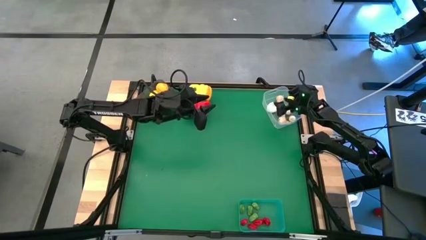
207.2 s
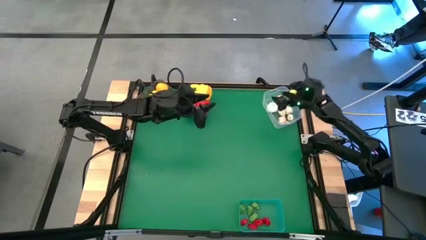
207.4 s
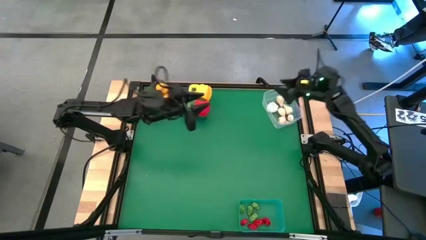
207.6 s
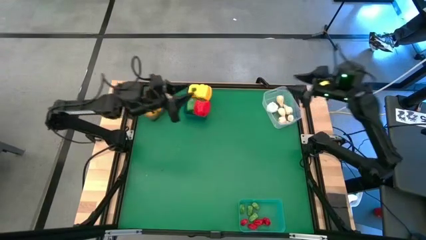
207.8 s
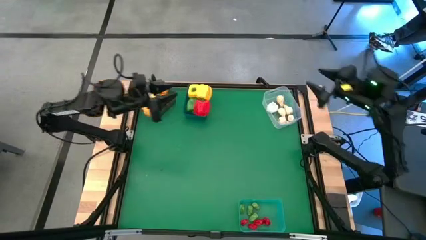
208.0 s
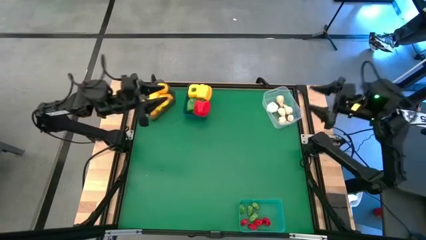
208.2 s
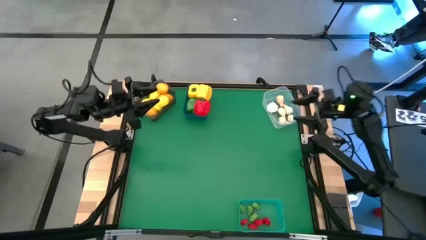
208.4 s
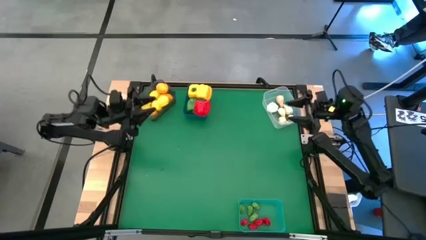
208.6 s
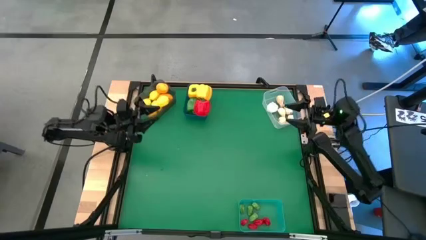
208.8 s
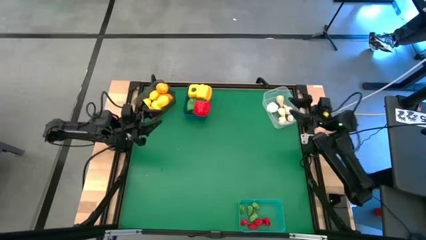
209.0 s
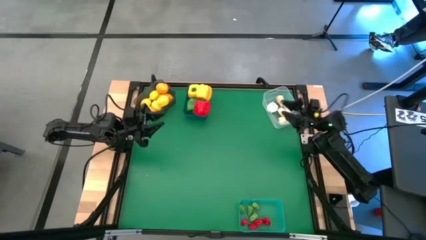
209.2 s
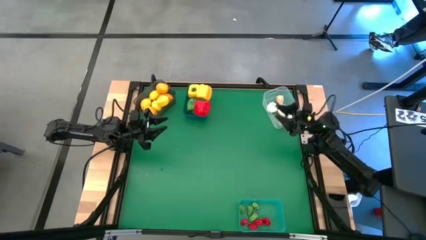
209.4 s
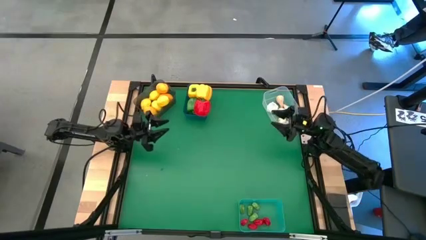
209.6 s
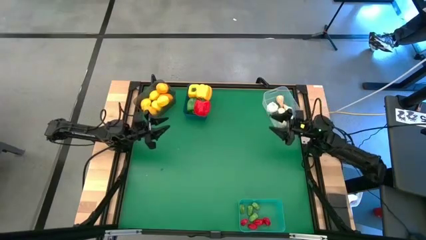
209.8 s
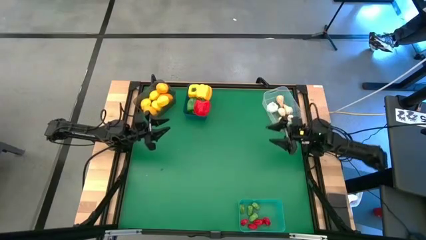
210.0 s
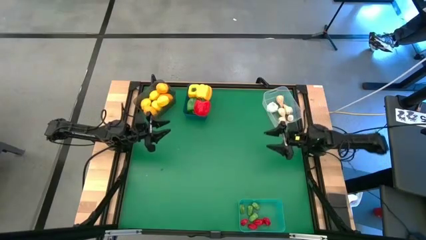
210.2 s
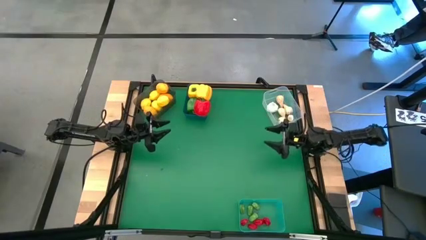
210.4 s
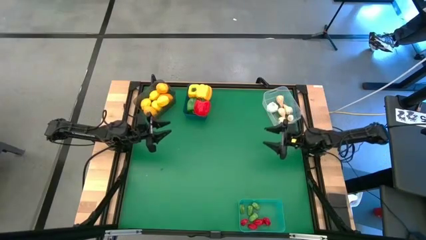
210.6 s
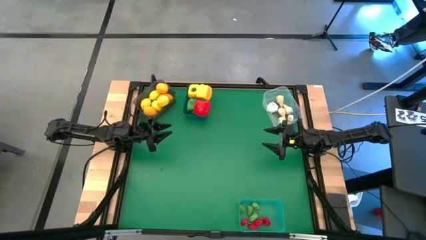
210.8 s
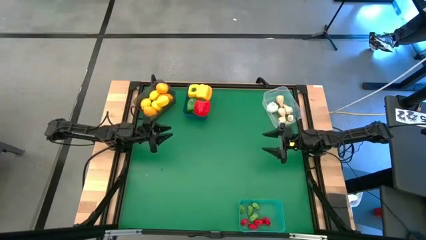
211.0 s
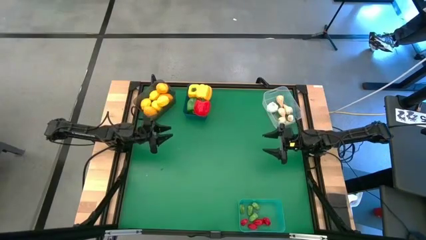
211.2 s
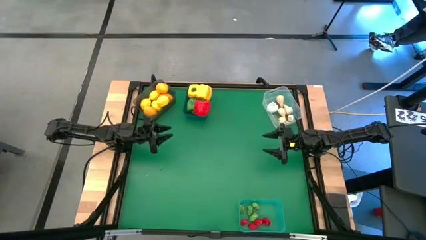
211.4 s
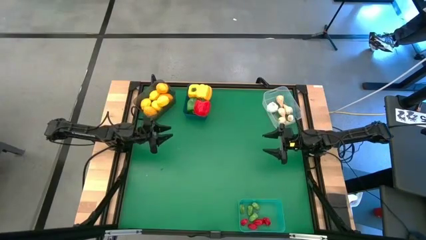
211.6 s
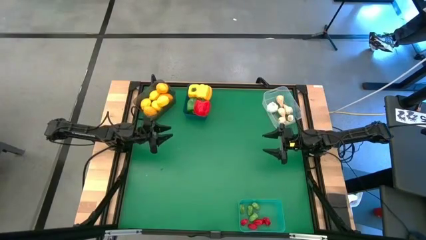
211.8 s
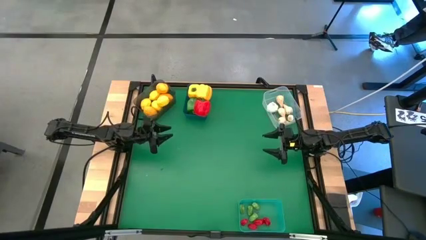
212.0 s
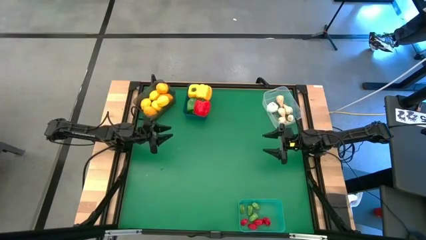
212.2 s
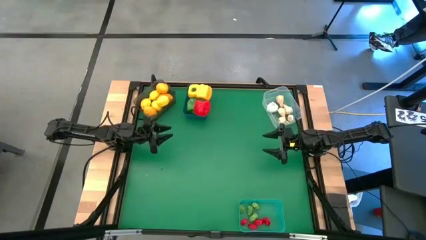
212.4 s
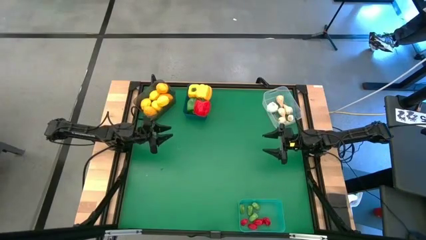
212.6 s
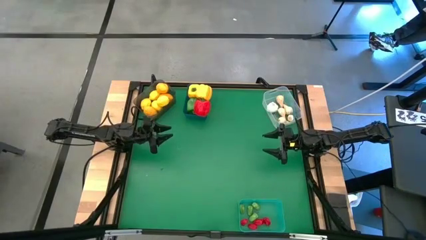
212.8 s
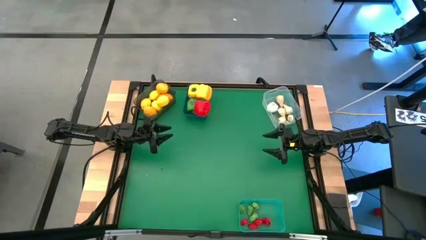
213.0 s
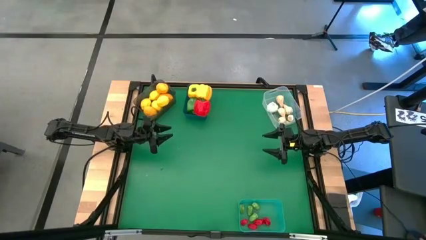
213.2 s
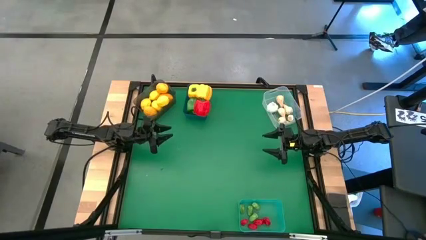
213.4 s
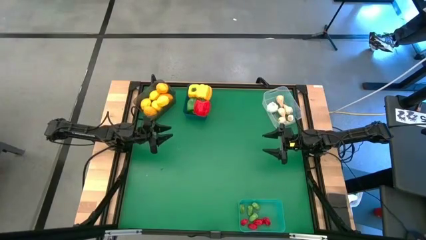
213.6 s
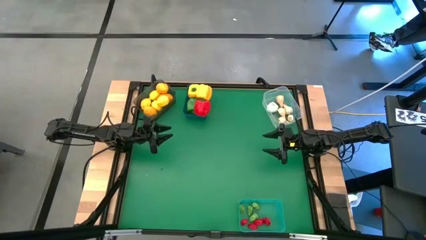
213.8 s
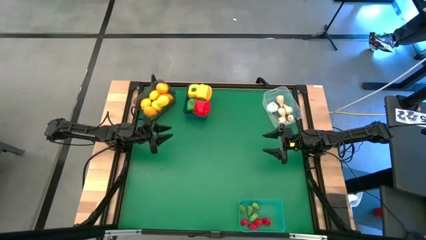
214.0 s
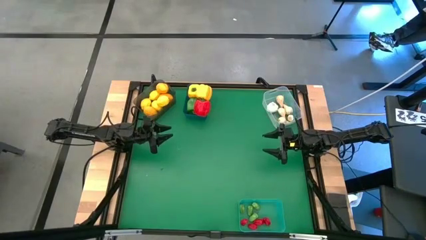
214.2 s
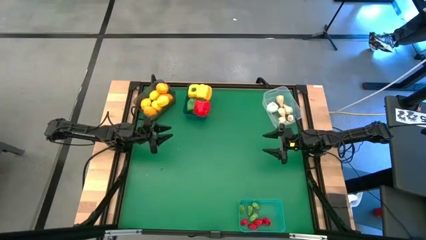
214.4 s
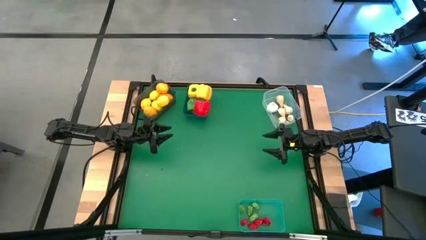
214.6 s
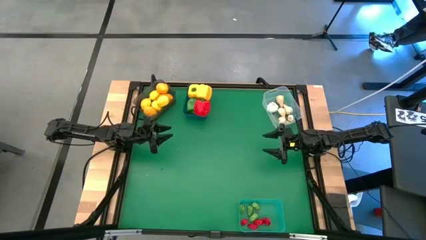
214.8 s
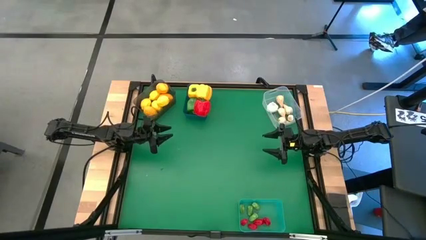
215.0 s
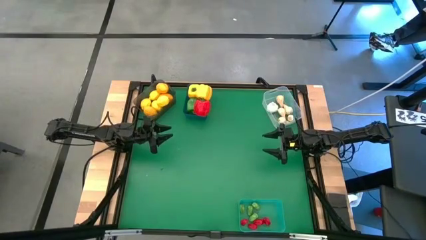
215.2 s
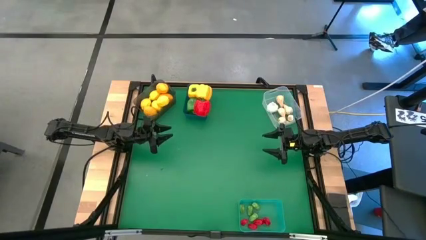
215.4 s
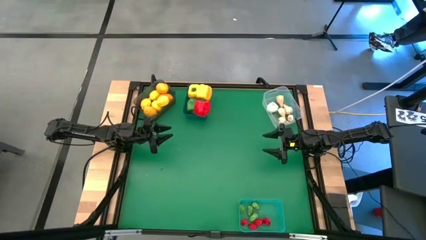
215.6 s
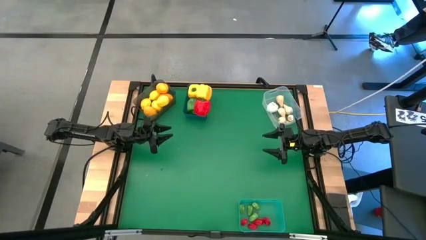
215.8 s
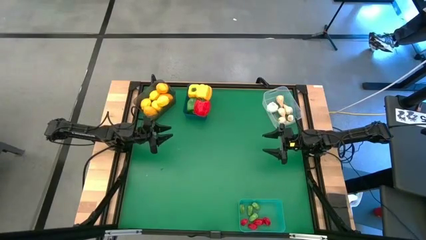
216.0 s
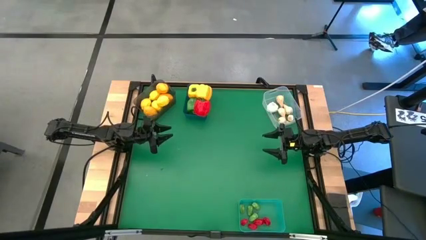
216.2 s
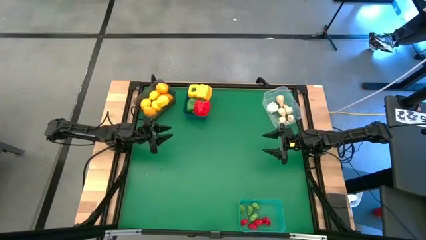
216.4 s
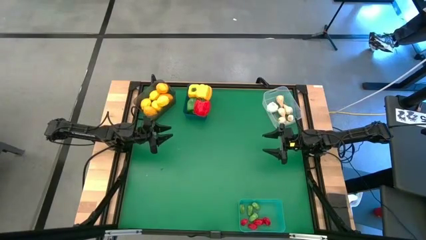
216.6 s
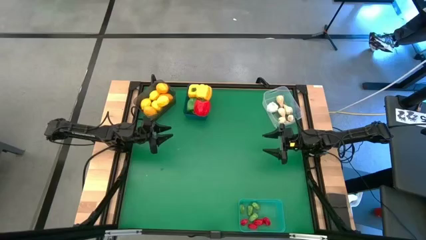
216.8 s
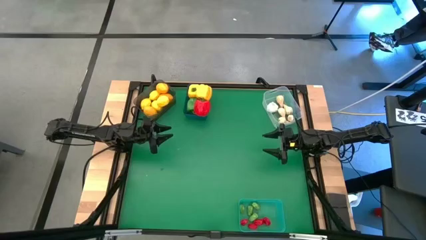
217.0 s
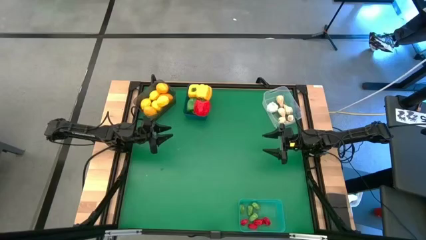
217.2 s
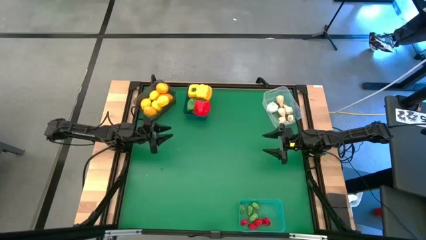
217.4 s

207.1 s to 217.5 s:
Task: Sort produce into baskets
Return to Home Position

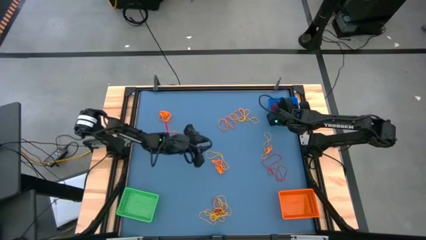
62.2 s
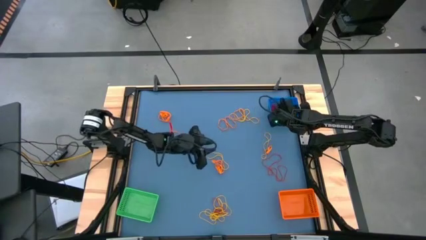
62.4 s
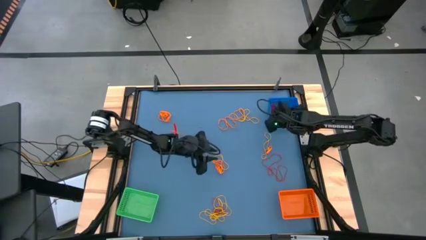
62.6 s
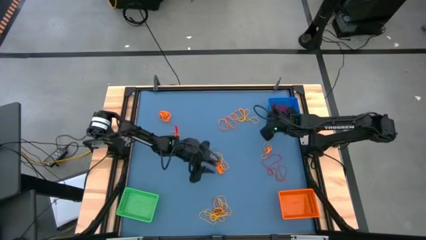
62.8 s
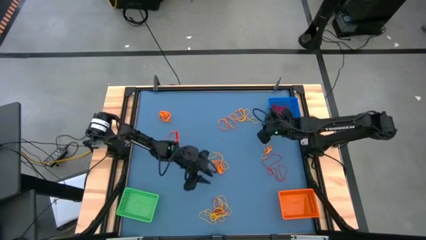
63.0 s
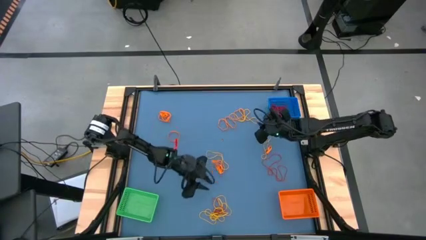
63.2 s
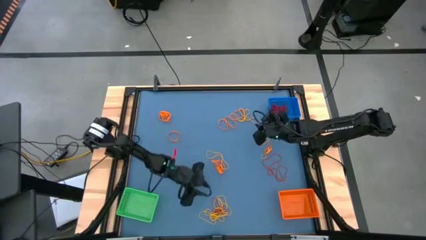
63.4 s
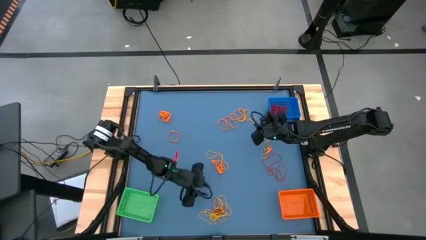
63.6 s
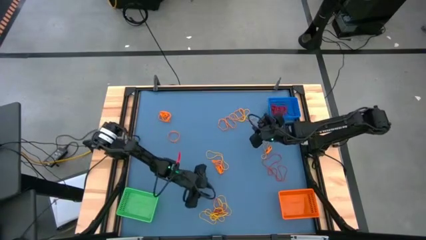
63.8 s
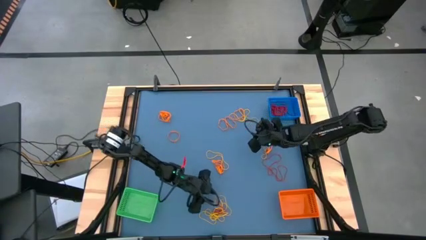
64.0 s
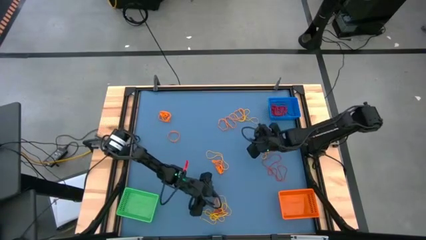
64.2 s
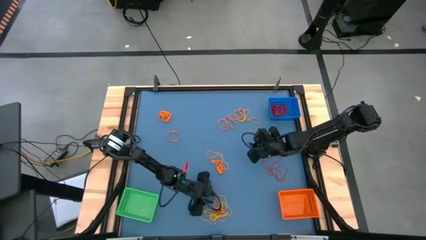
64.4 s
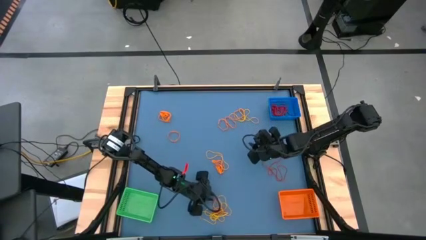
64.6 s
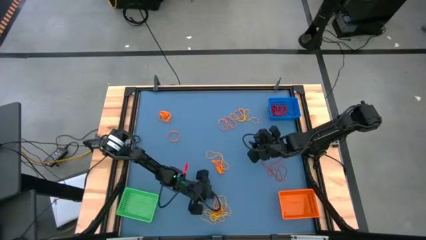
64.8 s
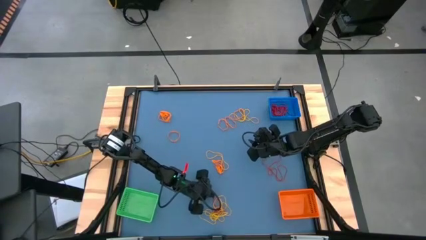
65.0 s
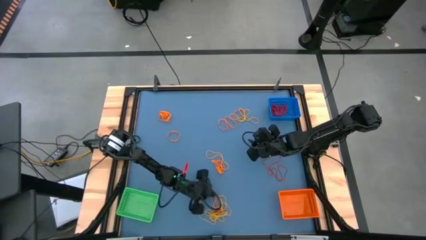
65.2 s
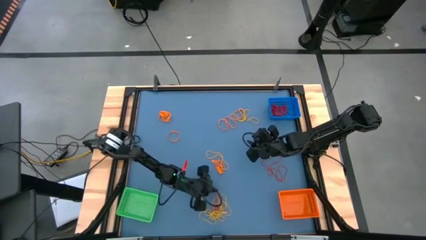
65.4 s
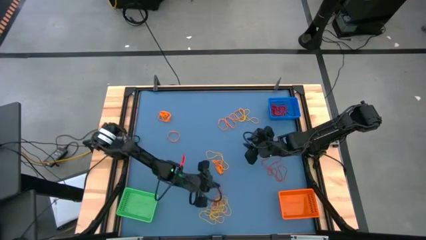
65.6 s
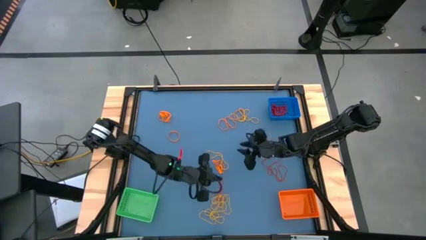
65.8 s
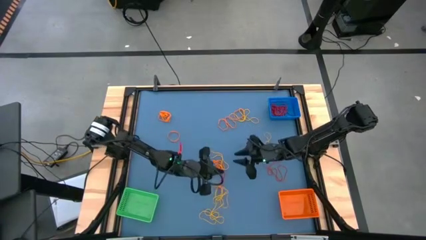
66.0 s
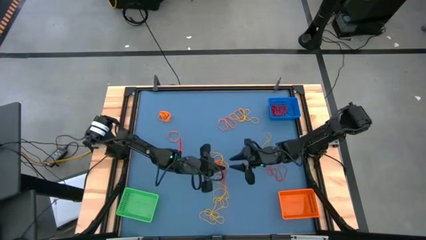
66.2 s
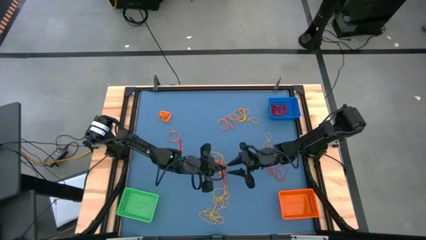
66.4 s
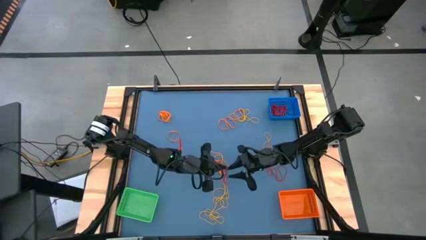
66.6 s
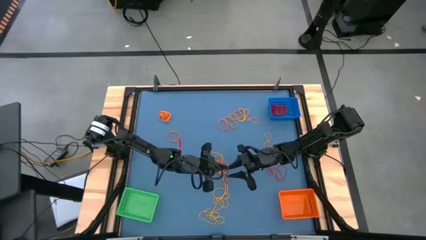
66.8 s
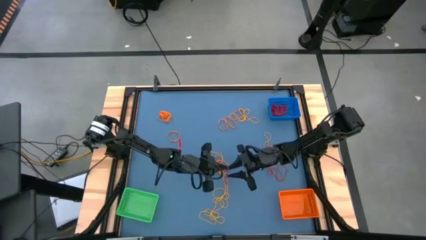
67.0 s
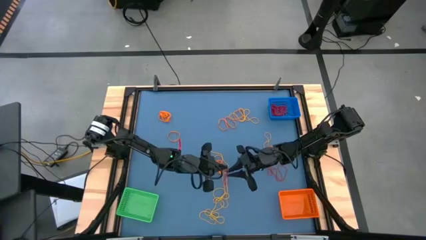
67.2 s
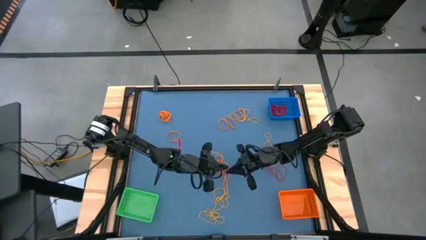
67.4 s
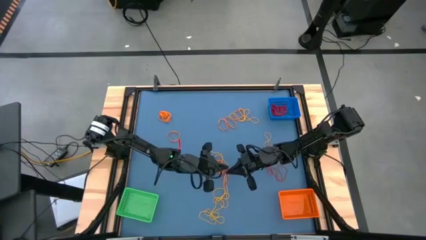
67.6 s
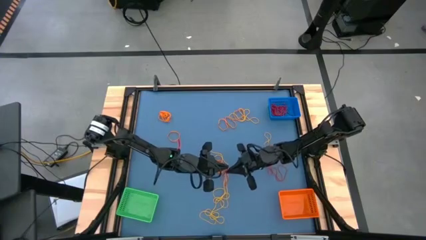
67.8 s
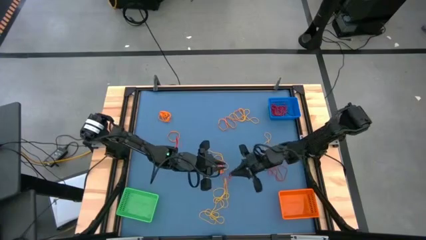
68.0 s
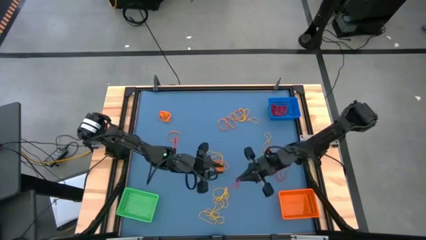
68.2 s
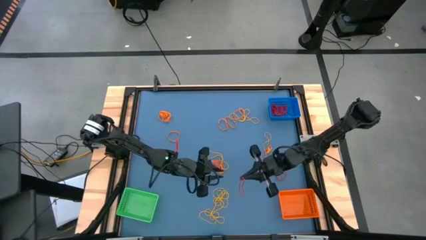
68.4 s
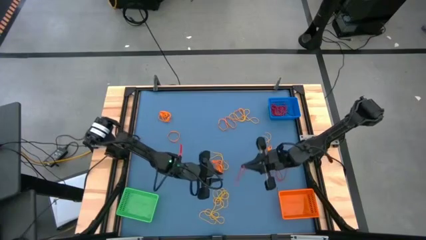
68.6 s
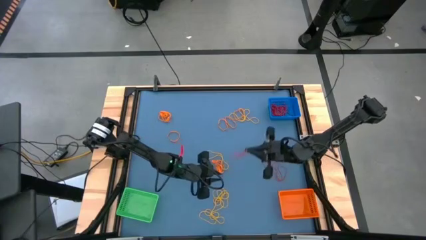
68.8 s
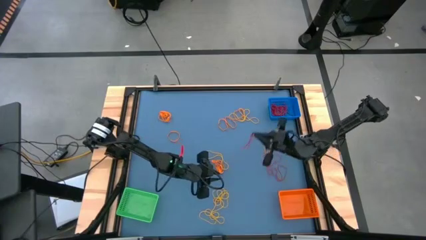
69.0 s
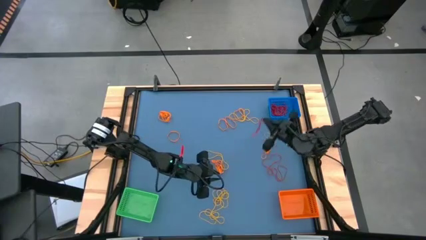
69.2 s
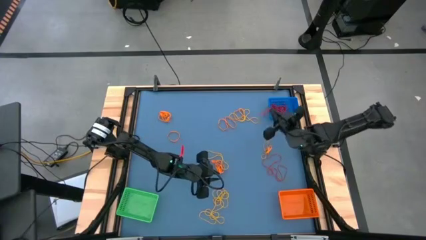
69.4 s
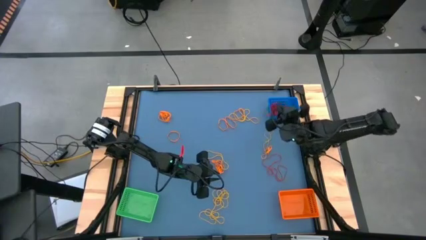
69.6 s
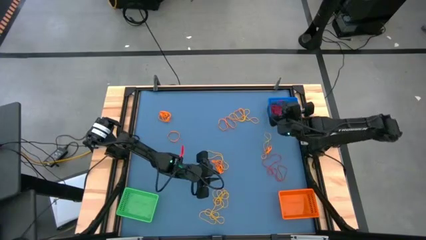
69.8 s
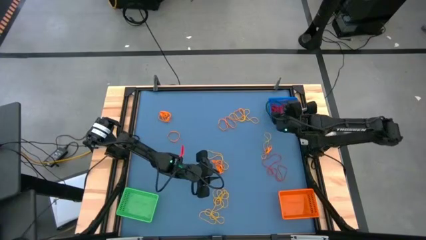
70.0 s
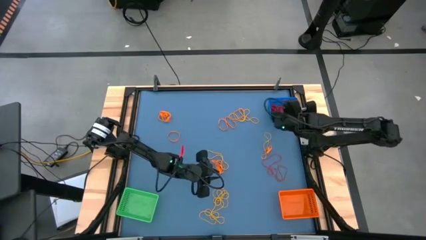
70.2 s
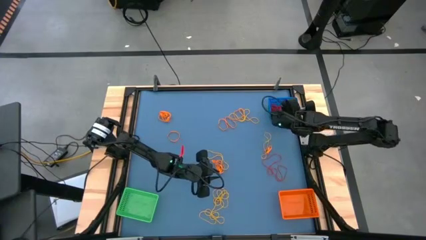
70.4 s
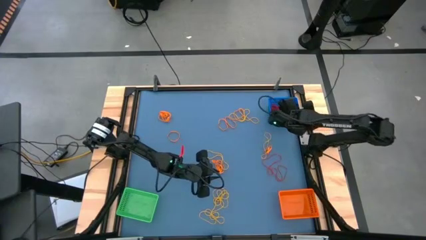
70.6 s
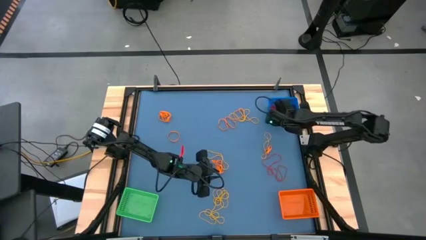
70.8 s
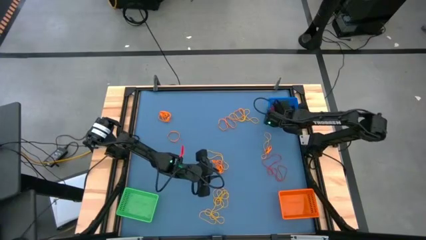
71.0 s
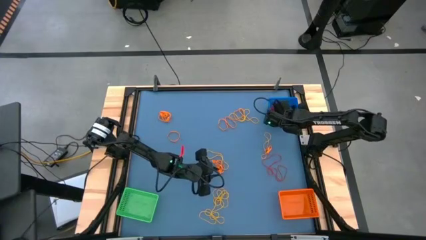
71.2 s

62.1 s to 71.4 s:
Task: Sort rubber bands into baskets
Put the red rubber band into the blue bin
